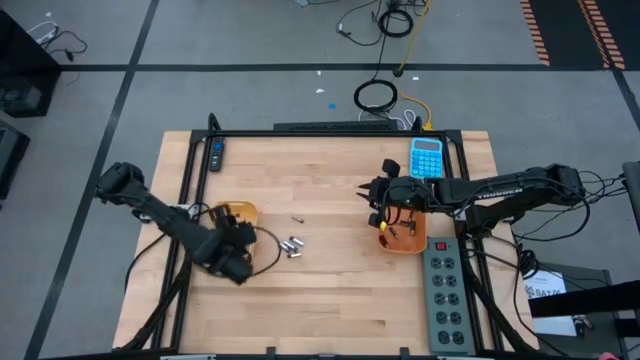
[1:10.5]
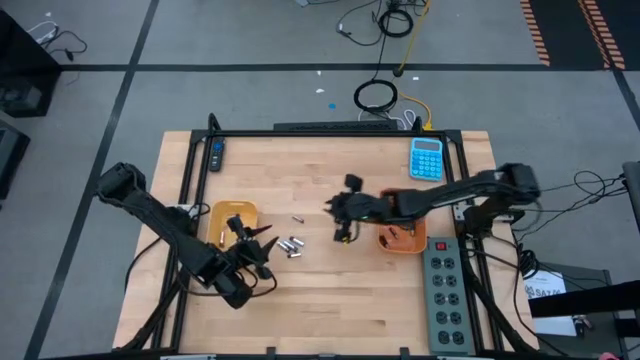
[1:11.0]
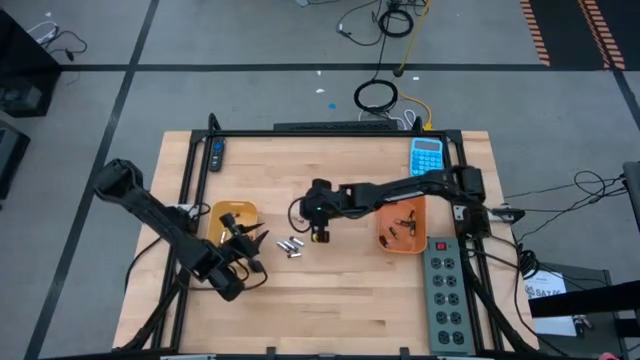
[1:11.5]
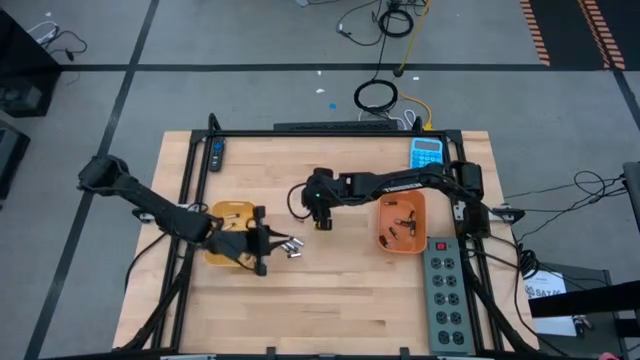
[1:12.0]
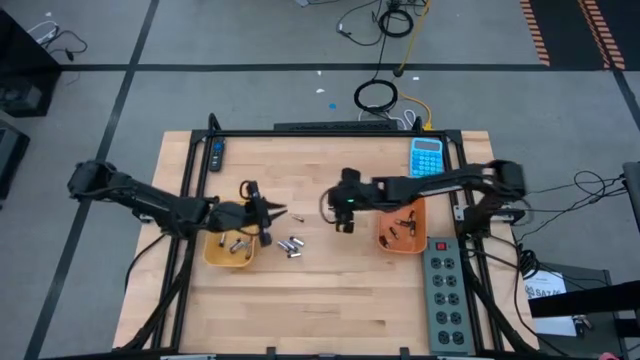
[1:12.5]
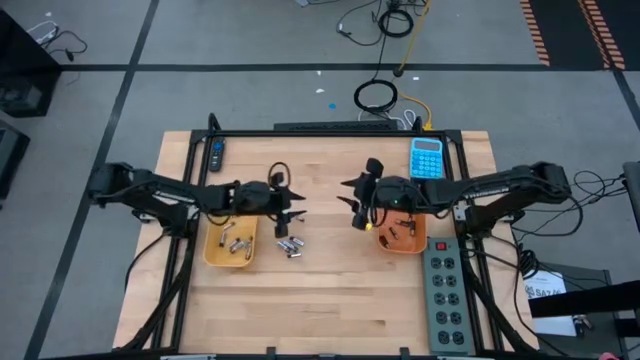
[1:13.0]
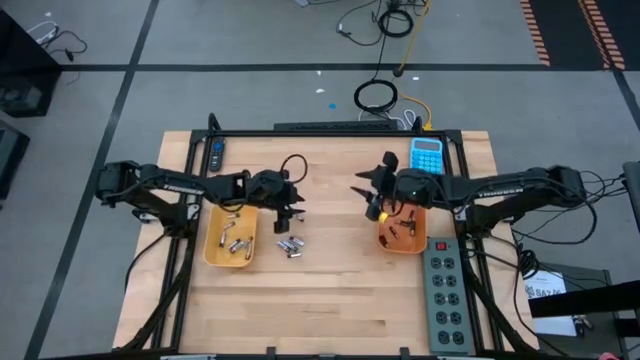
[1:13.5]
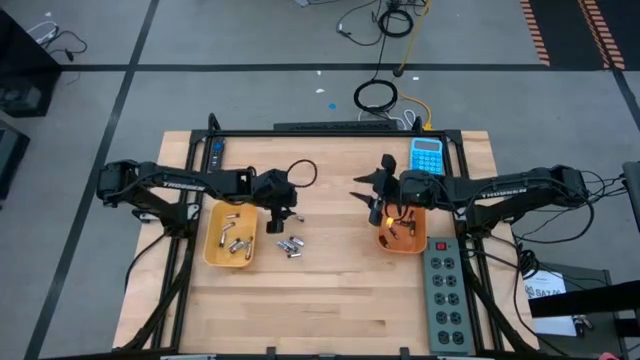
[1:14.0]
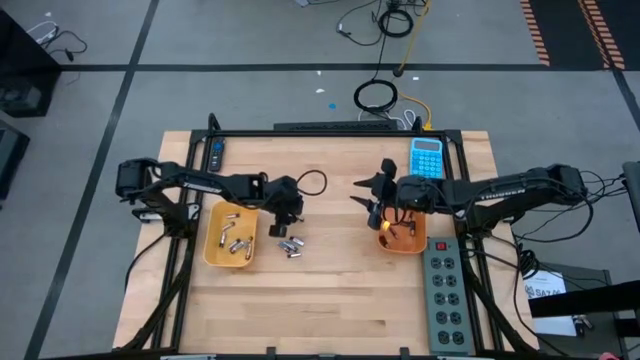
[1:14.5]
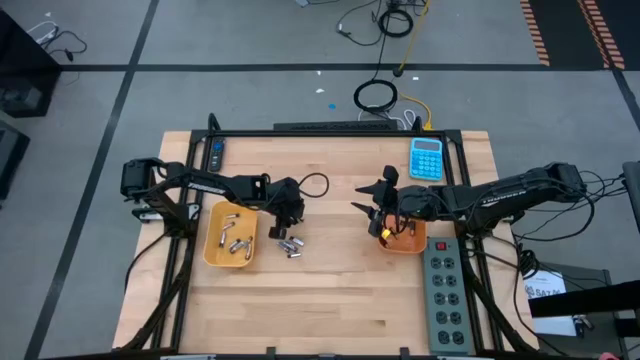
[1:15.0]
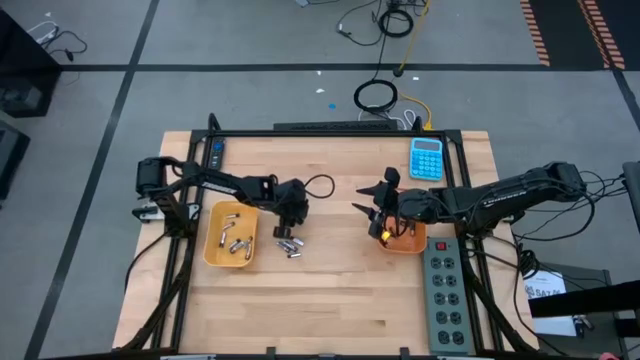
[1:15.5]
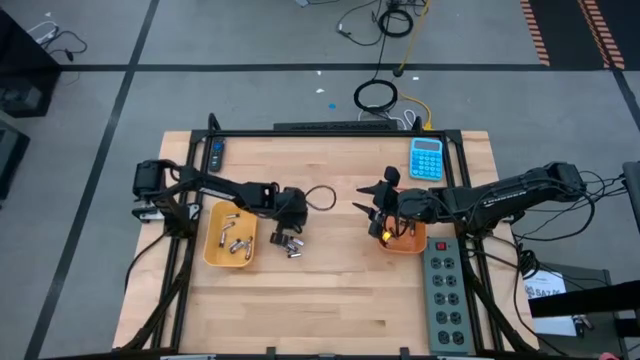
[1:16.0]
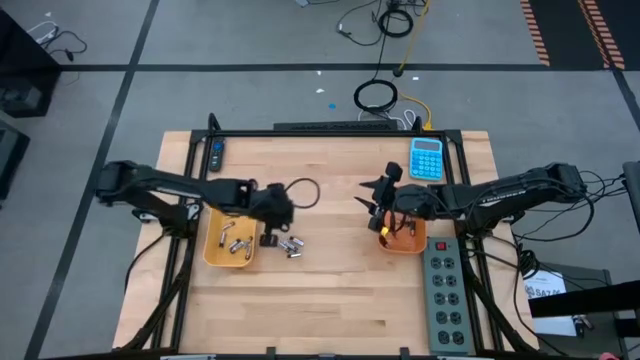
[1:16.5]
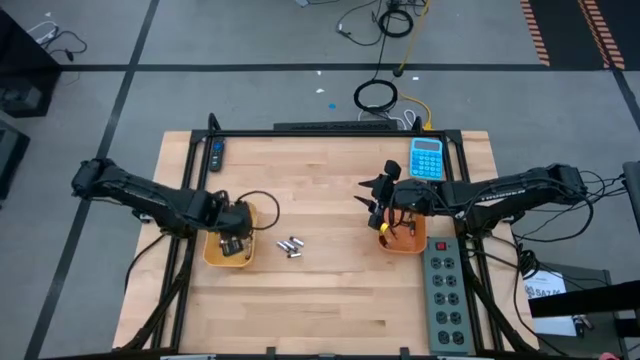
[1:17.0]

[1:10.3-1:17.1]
Task: Sort batteries
Put the silver battery into the yellow bin

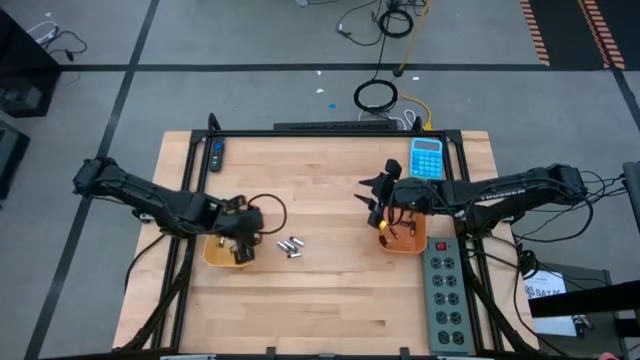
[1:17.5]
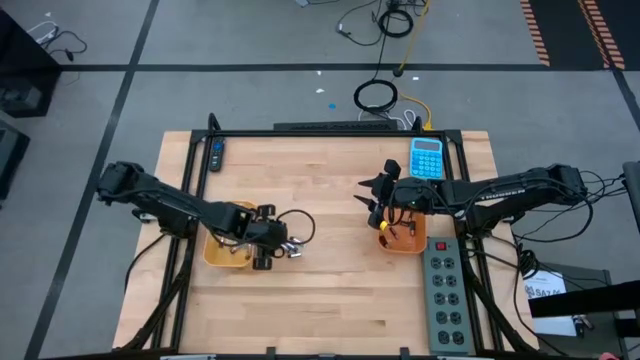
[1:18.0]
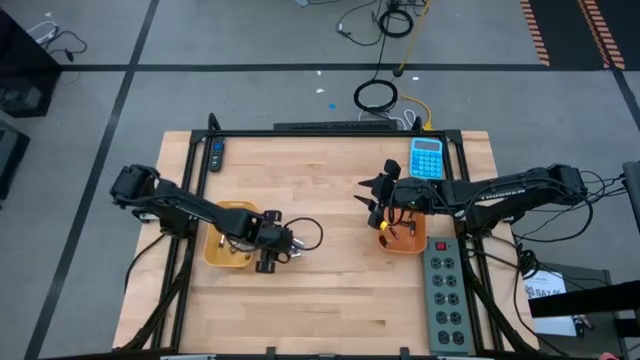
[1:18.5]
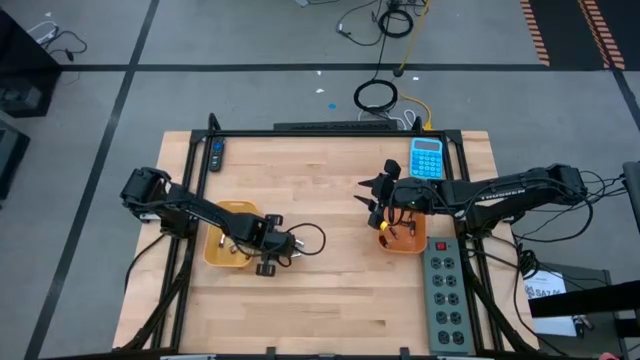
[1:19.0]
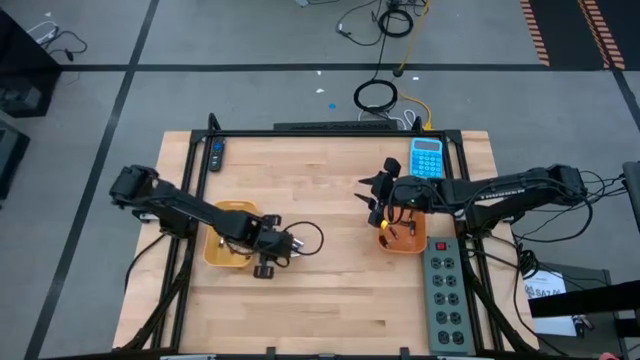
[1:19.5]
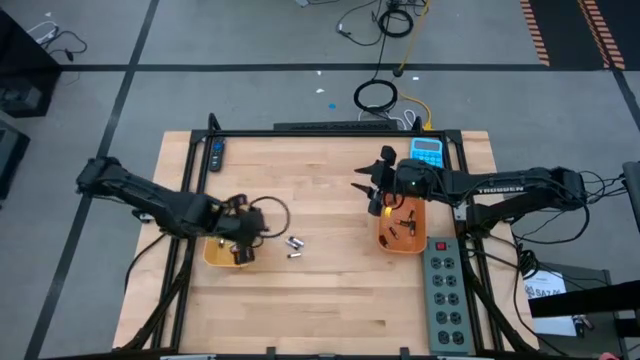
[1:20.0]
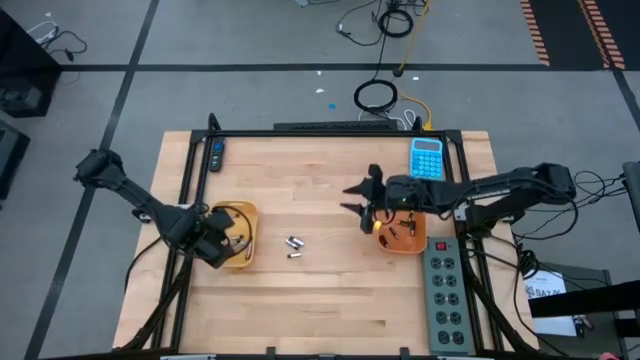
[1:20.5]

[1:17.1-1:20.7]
Put the silver battery into the yellow bin

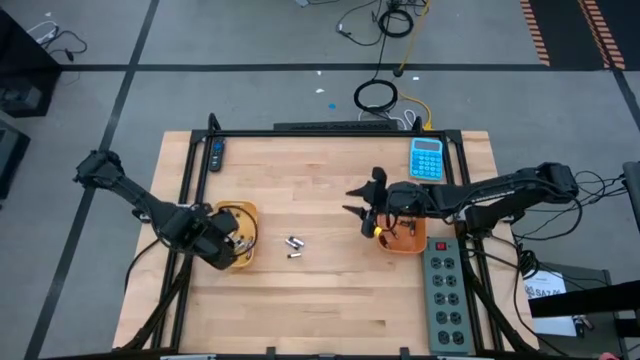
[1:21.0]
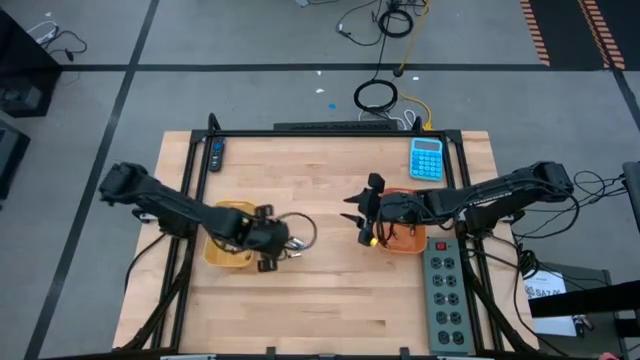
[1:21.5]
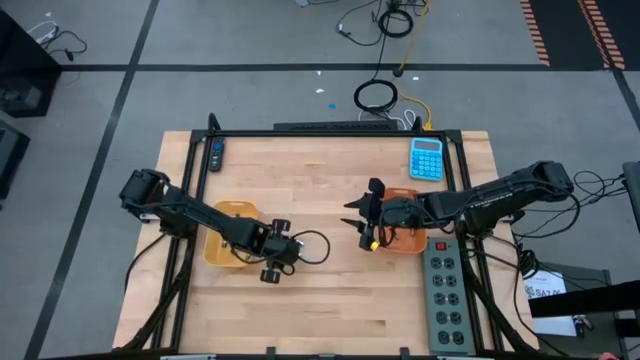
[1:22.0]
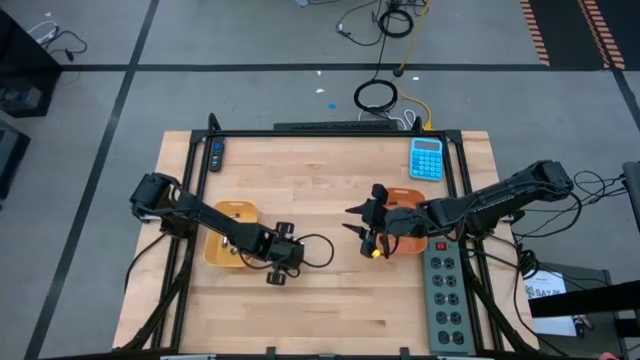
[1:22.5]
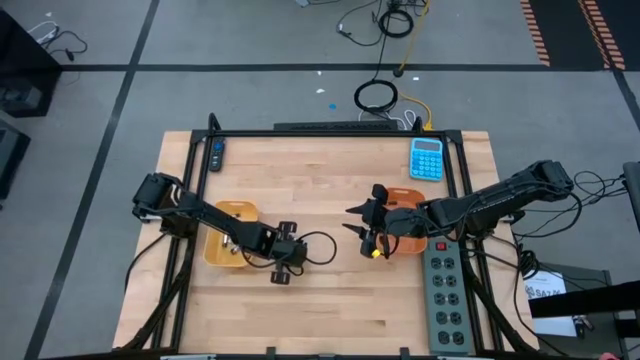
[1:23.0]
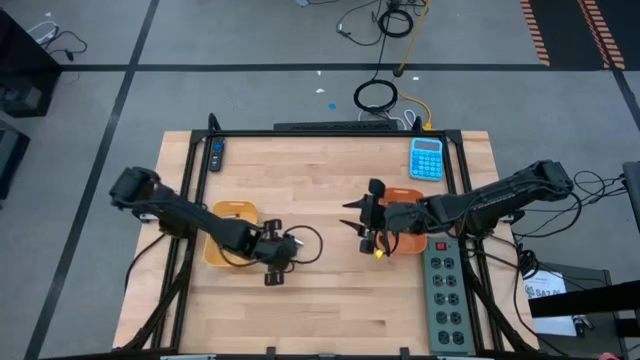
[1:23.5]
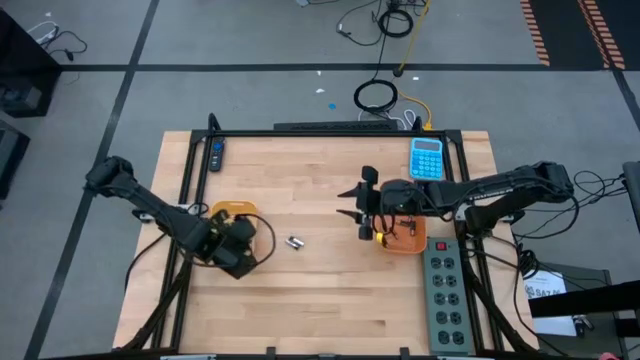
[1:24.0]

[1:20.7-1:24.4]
Put the silver battery into the yellow bin

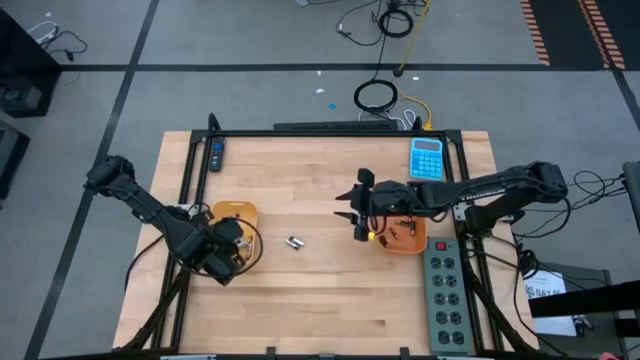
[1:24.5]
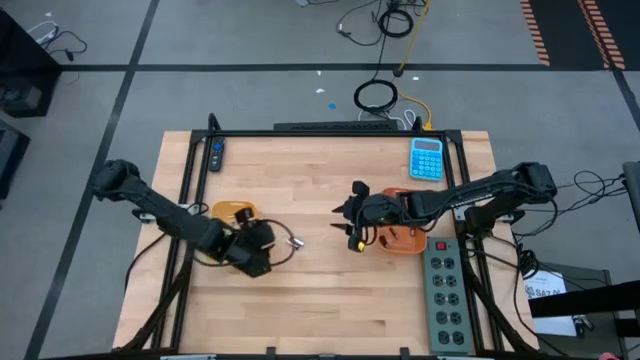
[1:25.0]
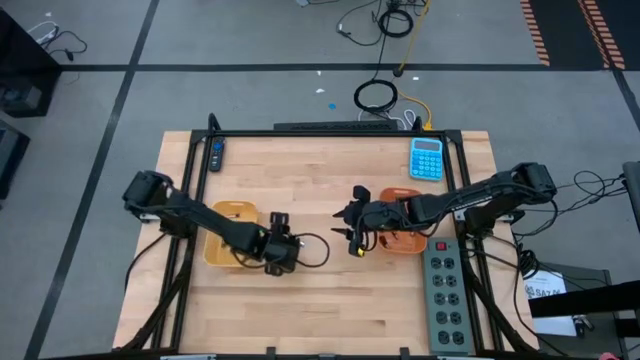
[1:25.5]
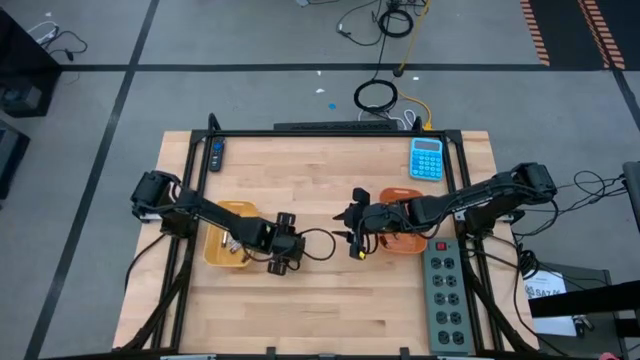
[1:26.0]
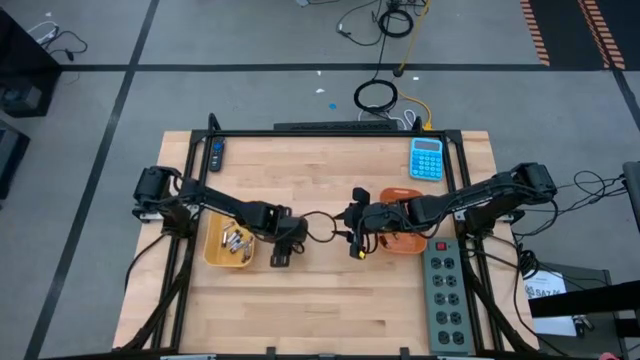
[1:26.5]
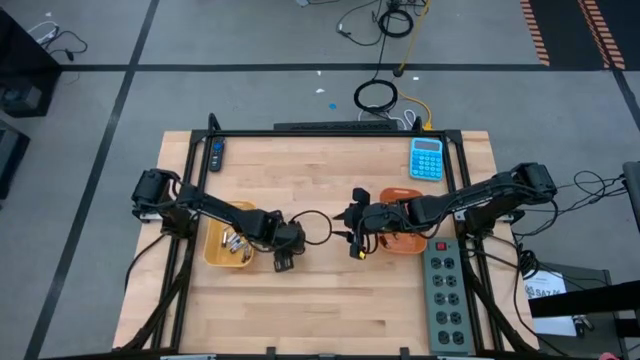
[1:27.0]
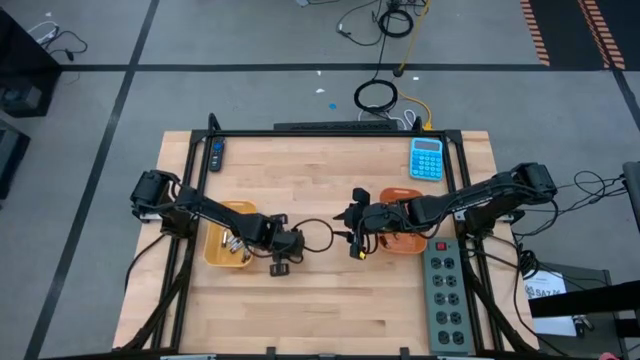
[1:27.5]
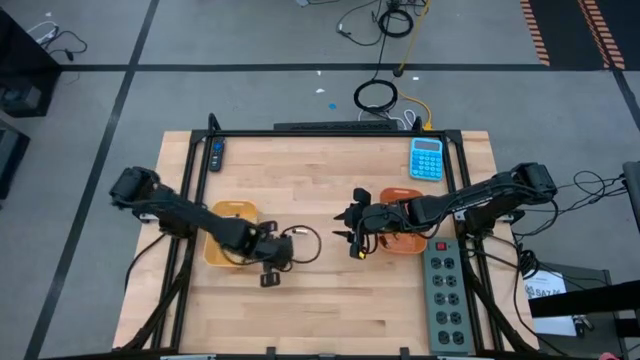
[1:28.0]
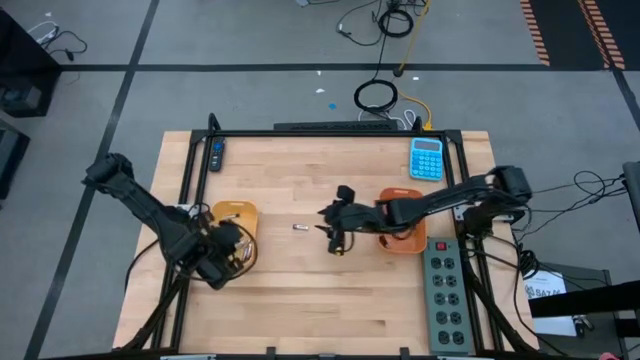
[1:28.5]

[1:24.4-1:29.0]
Put the silver battery into the yellow bin

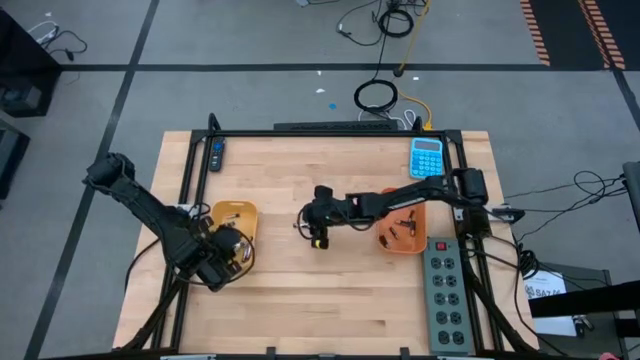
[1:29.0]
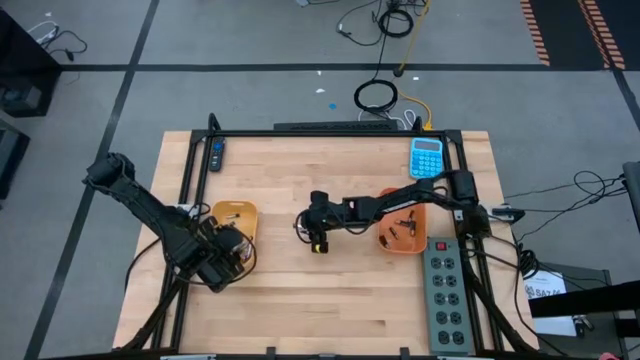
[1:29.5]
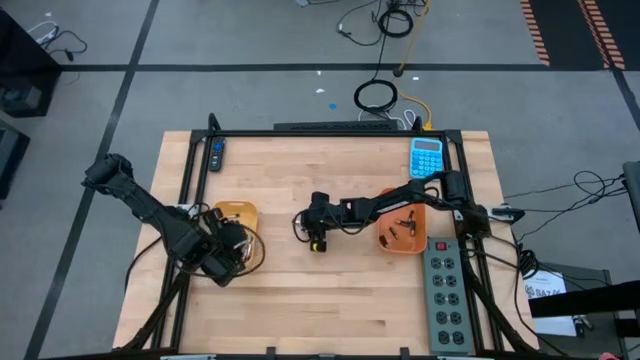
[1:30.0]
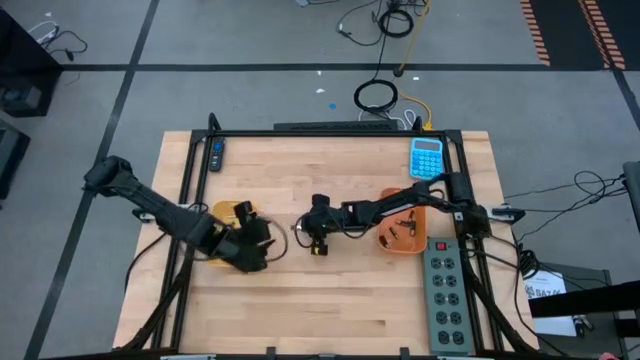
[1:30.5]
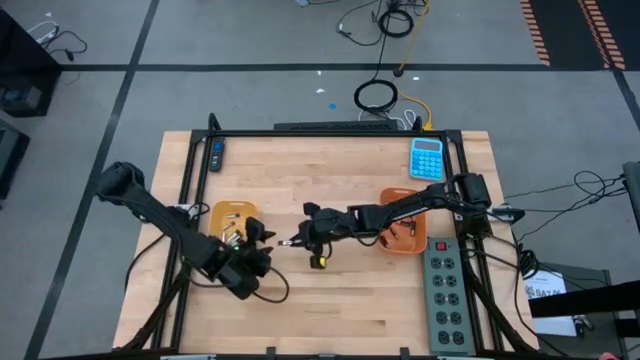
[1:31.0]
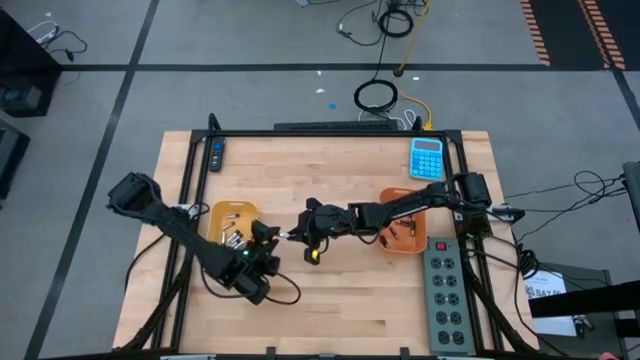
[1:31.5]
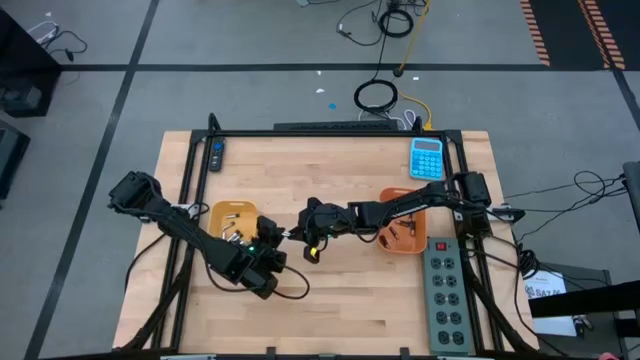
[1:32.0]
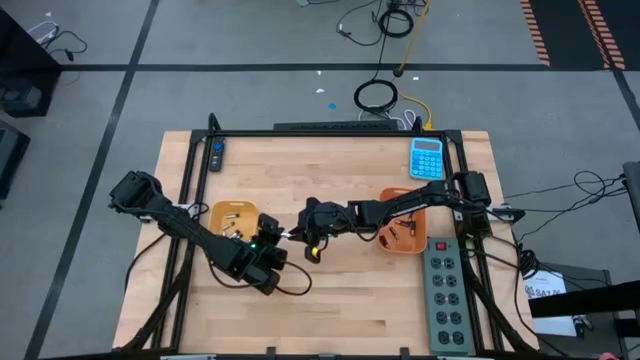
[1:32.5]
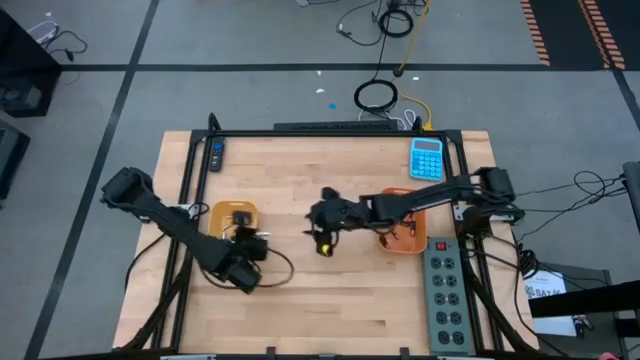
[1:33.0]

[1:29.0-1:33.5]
Put the silver battery into the yellow bin
